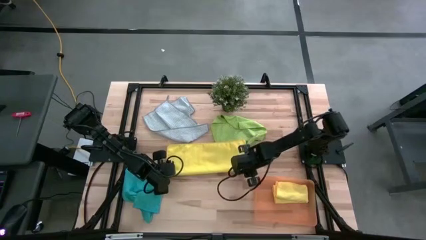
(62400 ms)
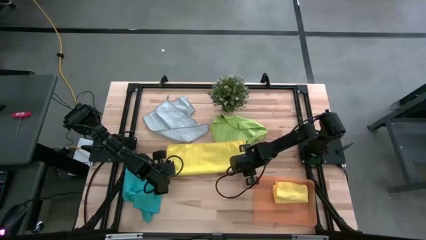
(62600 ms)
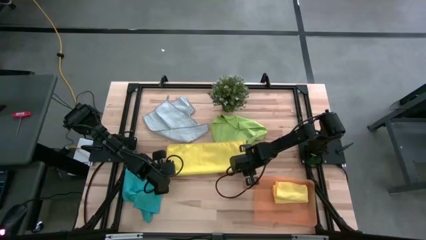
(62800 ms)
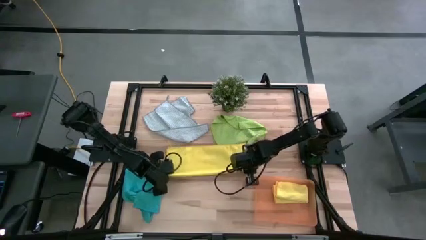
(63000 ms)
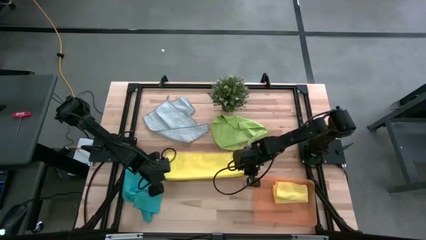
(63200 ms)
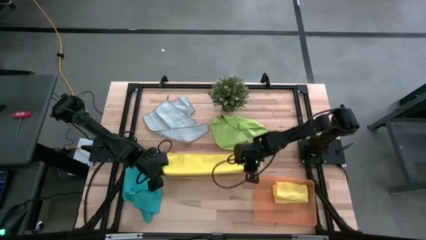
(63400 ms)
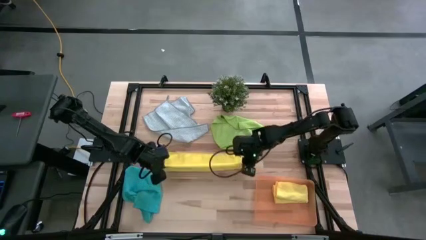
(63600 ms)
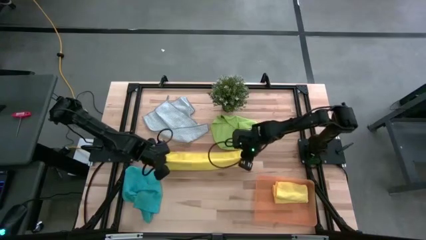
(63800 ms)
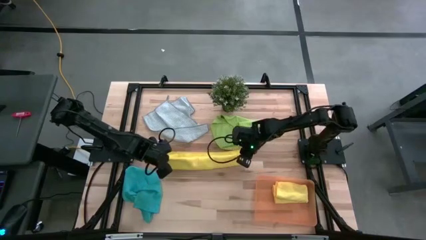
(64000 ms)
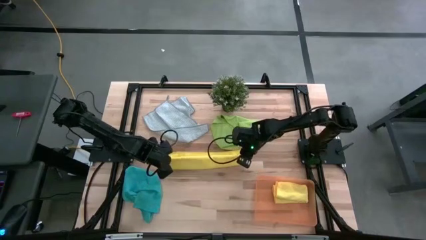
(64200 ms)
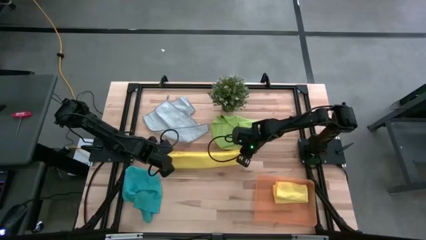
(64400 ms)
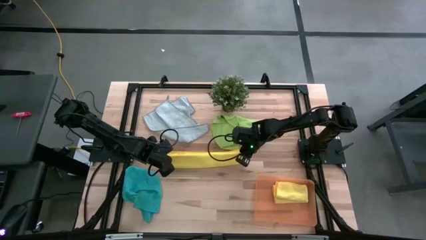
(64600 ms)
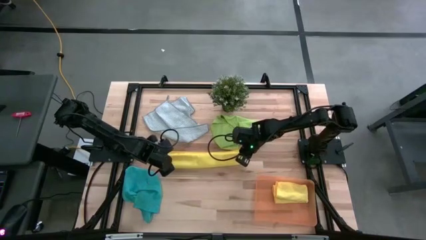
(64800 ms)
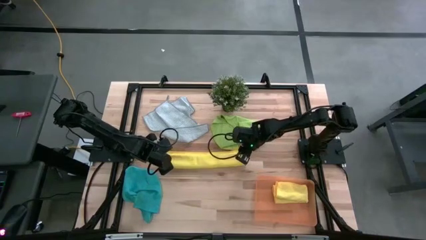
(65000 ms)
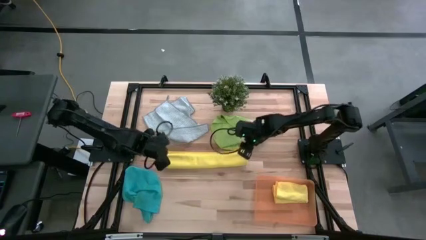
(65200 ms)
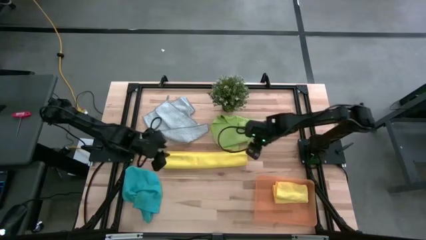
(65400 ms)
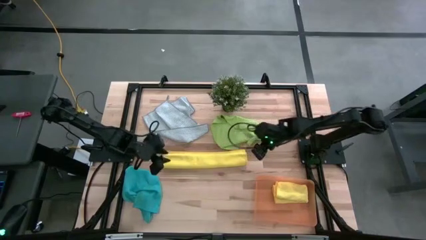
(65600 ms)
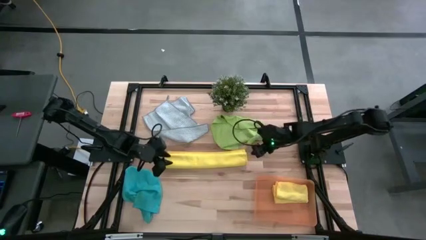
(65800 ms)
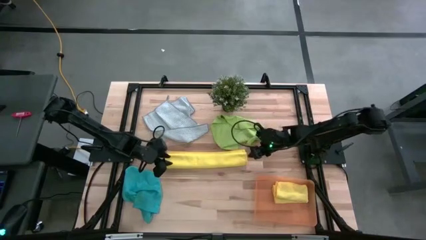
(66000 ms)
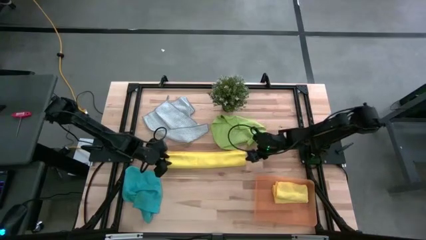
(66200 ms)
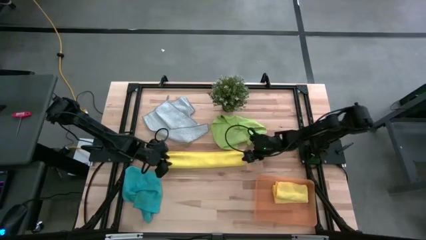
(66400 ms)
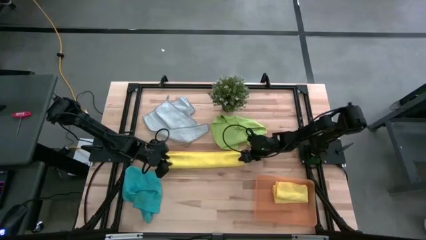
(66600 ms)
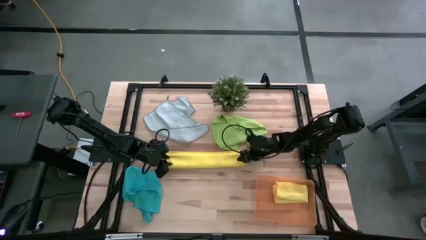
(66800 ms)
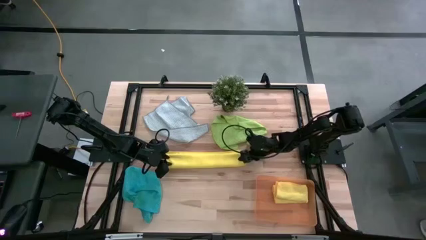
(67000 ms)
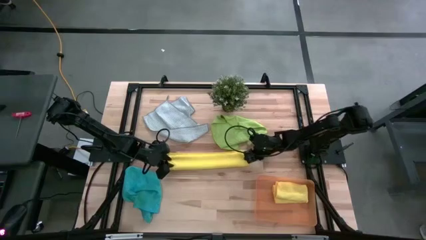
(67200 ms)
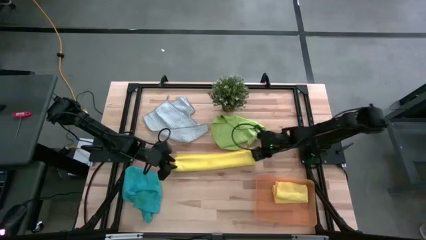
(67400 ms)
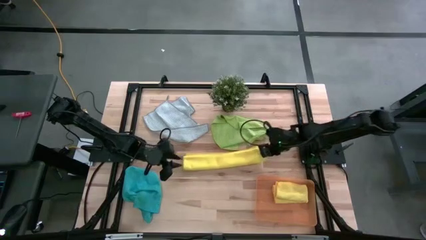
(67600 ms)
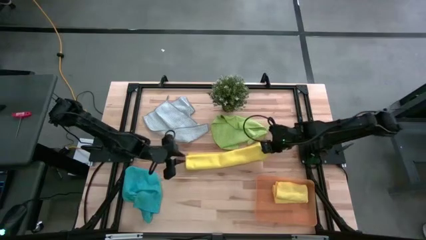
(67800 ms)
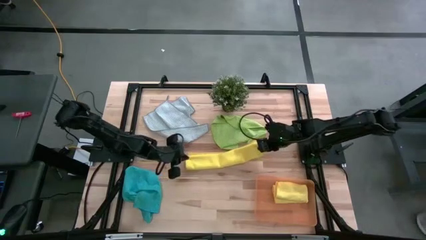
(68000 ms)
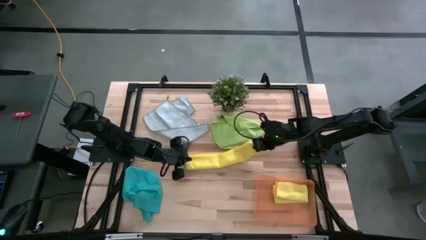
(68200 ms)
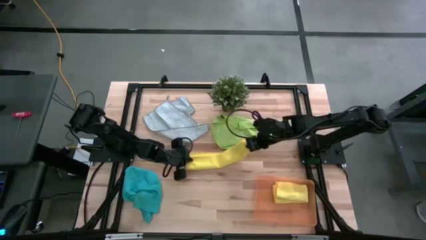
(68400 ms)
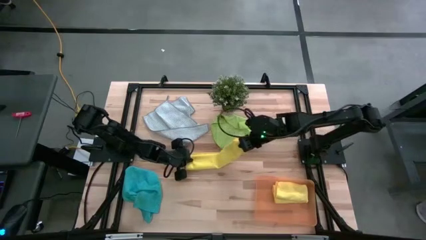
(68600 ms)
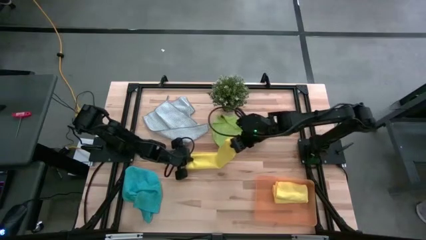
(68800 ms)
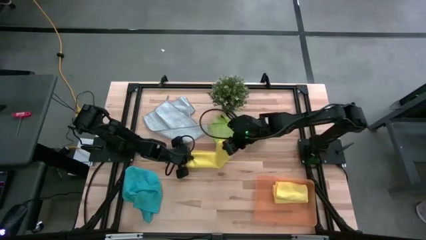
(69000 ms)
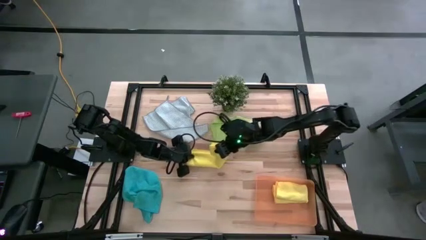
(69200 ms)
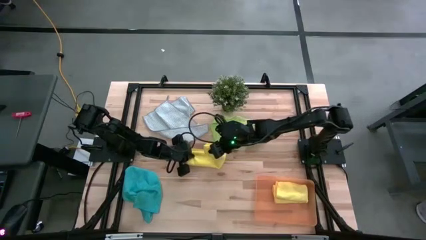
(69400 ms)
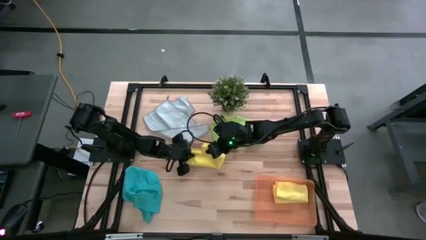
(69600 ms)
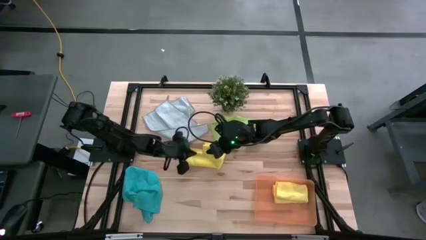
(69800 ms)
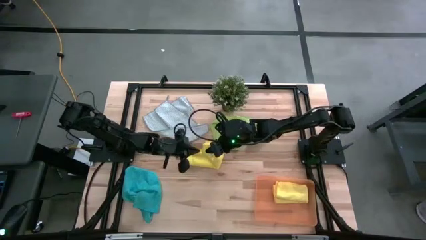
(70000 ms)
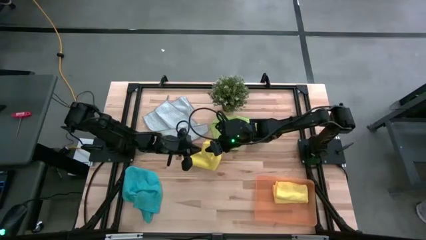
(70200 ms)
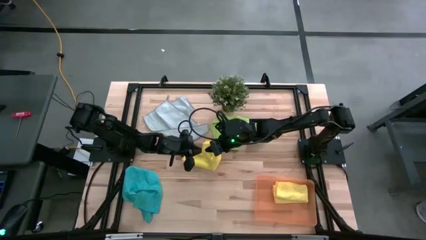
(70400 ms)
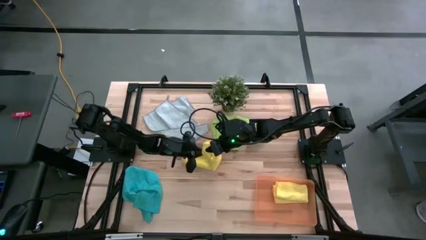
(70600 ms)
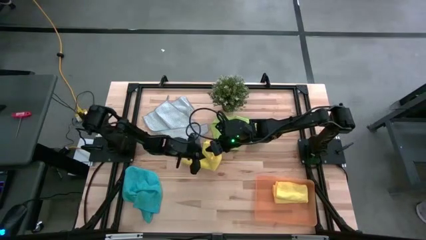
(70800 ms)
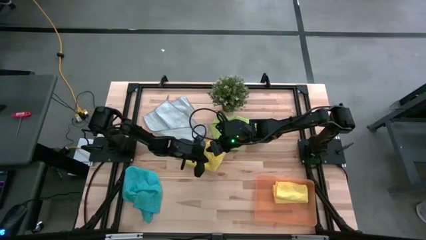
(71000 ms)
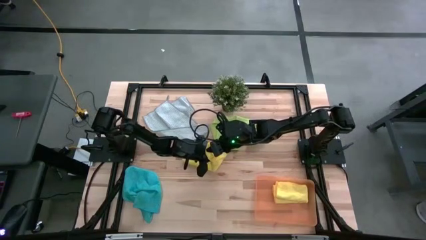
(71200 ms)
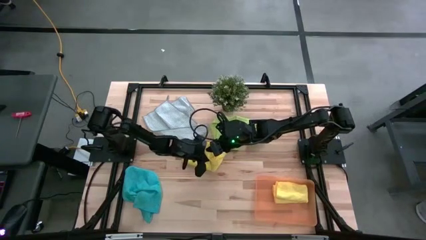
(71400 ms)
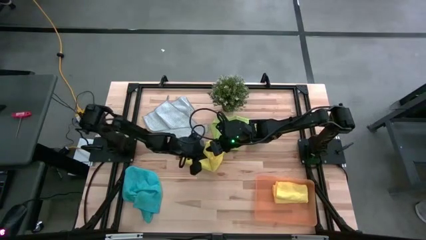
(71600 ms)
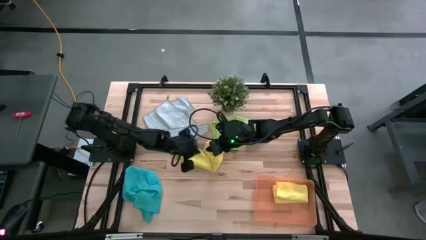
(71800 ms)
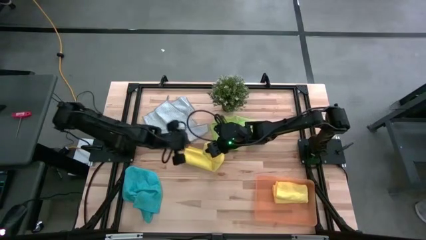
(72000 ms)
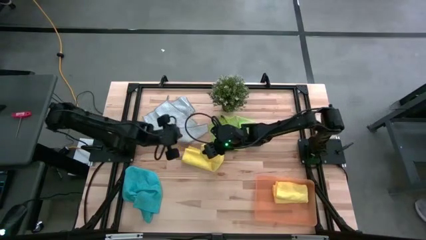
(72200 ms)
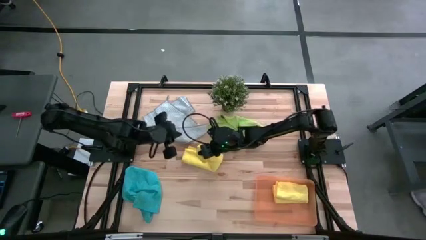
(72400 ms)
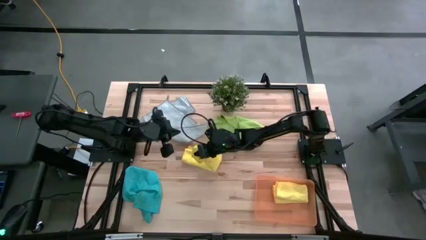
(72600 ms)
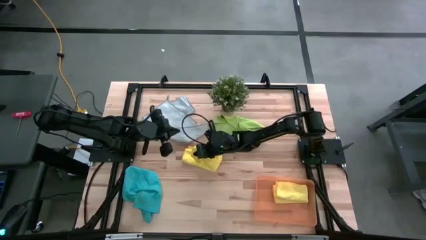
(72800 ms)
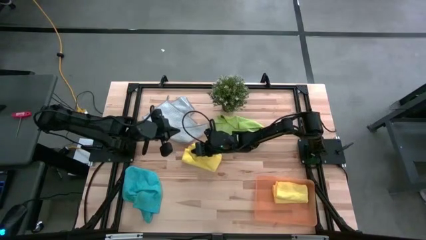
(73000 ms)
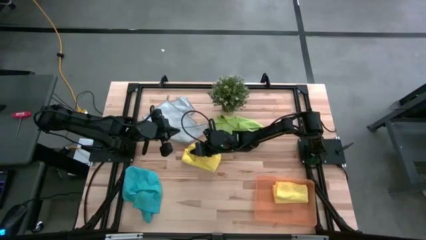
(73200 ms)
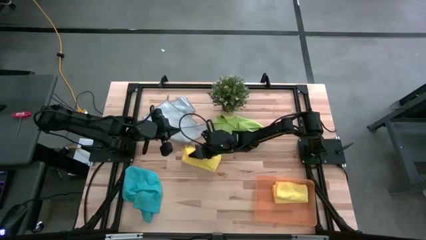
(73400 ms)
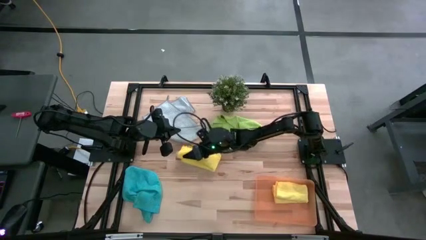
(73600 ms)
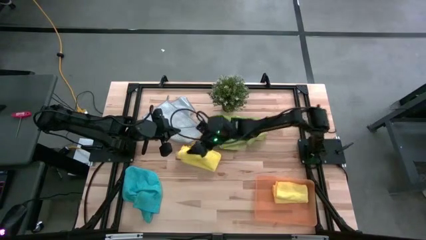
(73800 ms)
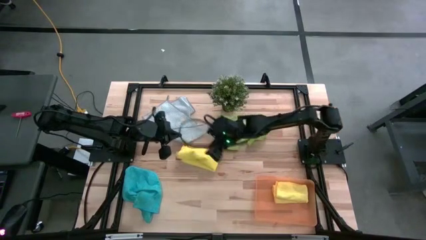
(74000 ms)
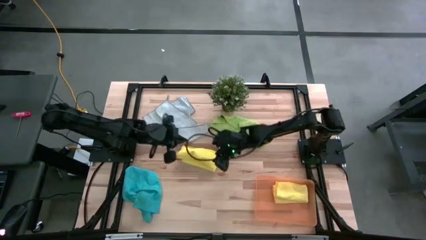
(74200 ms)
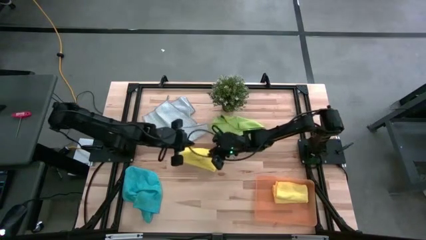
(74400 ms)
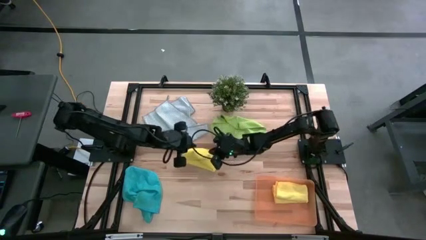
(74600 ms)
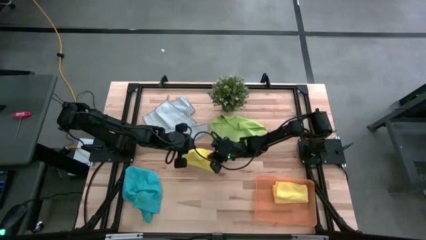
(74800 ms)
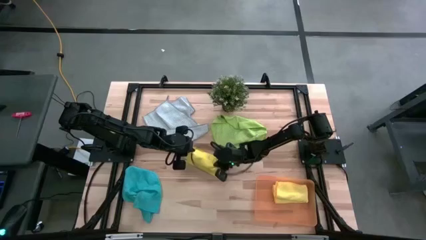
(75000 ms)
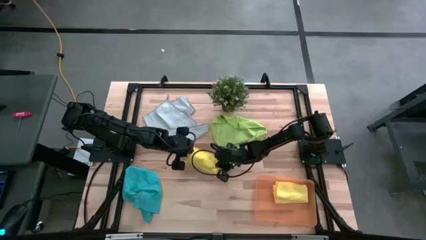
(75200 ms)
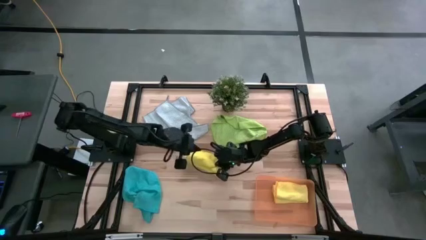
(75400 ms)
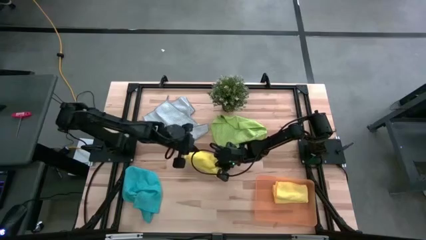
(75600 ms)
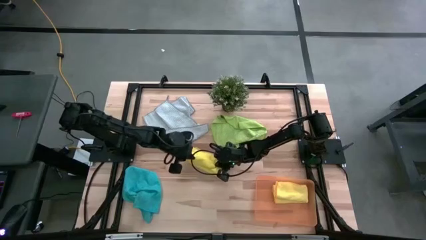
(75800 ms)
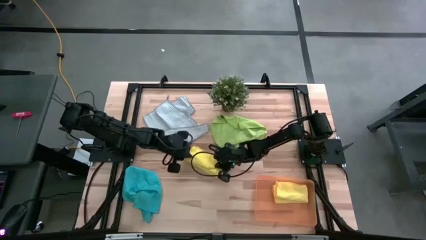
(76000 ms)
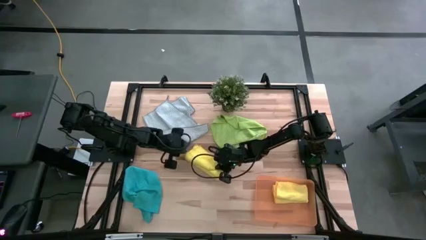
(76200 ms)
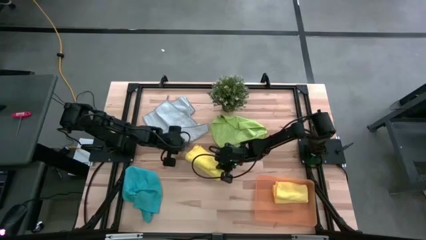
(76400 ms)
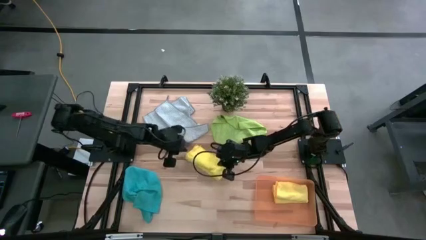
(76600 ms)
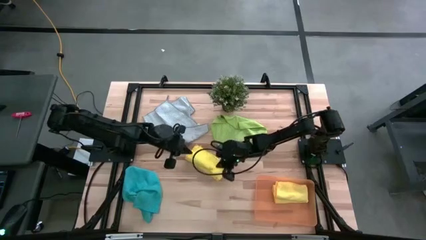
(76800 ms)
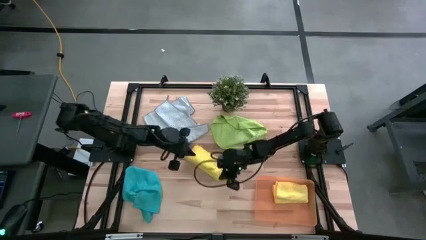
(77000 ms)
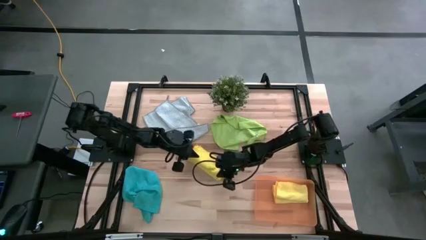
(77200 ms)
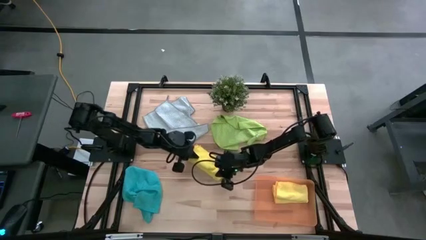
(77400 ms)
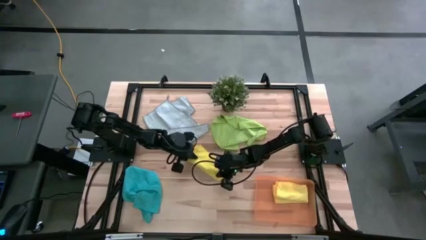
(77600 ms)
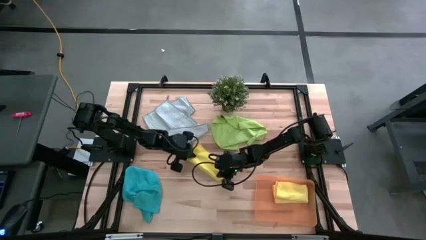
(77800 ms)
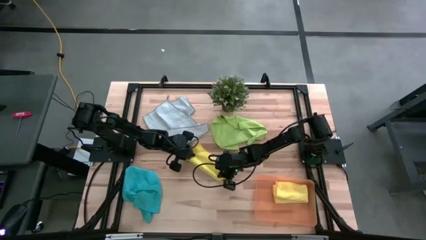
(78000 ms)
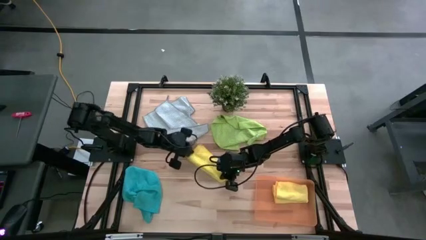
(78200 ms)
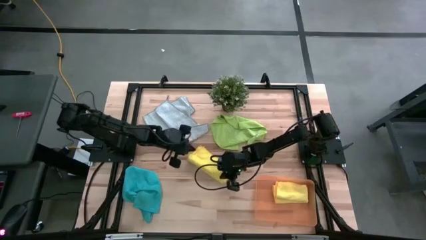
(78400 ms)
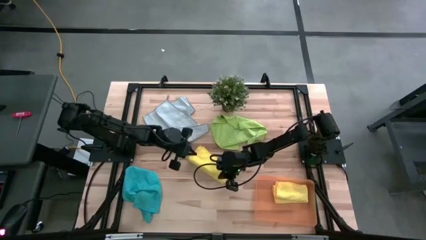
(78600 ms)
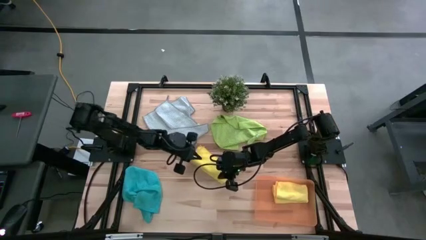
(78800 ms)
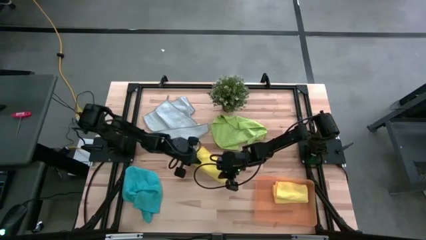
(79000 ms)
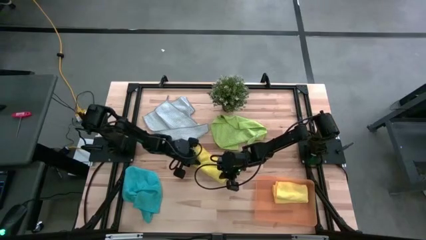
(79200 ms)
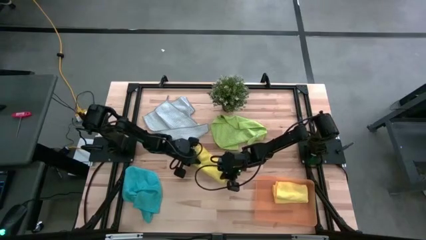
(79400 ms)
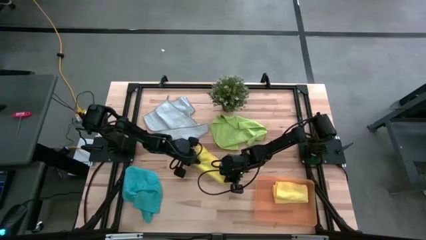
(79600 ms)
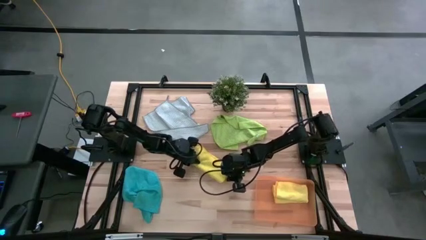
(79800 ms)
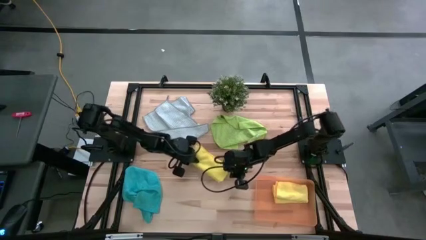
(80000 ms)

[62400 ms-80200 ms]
Task: Fold microfiber towels
Fold the yellow microfiber towel
